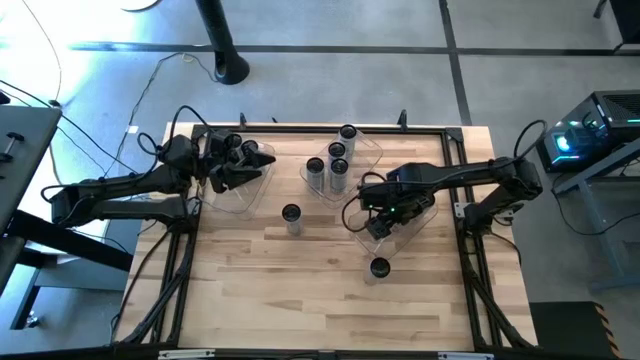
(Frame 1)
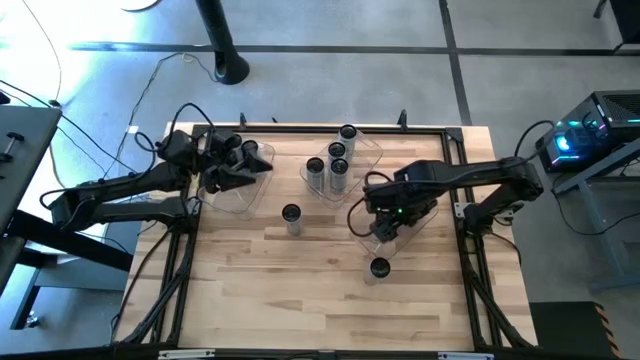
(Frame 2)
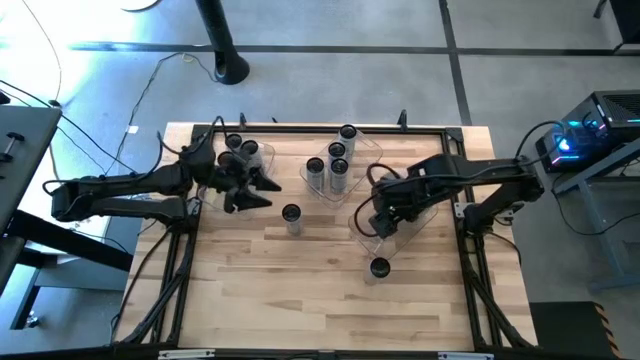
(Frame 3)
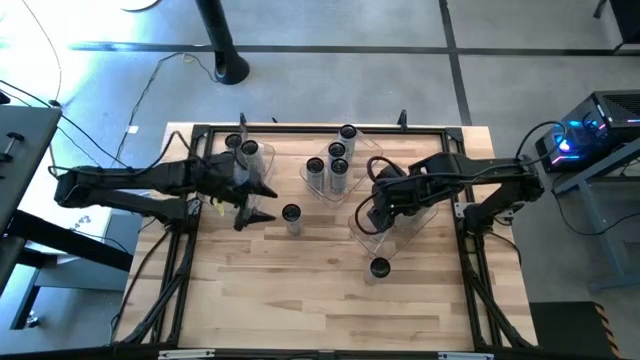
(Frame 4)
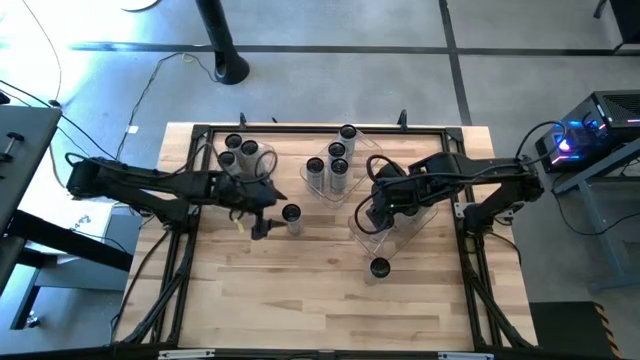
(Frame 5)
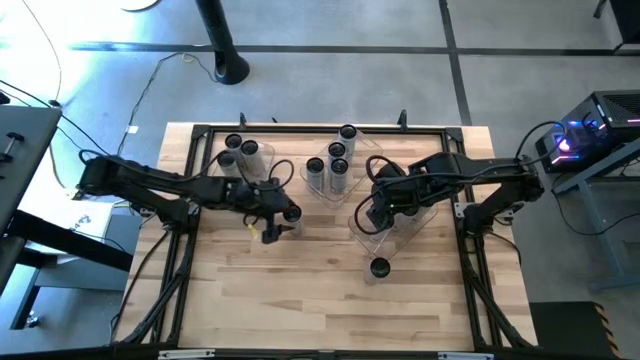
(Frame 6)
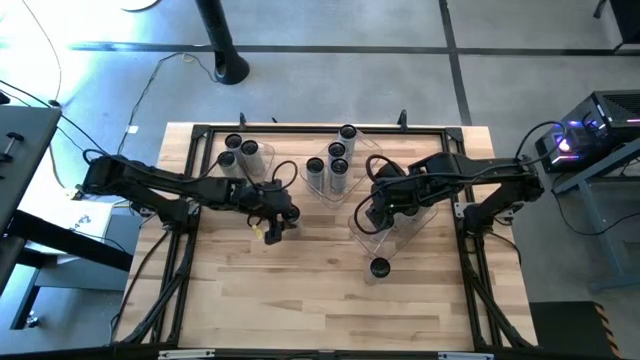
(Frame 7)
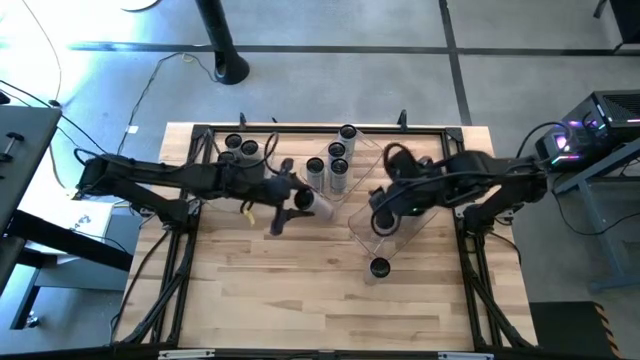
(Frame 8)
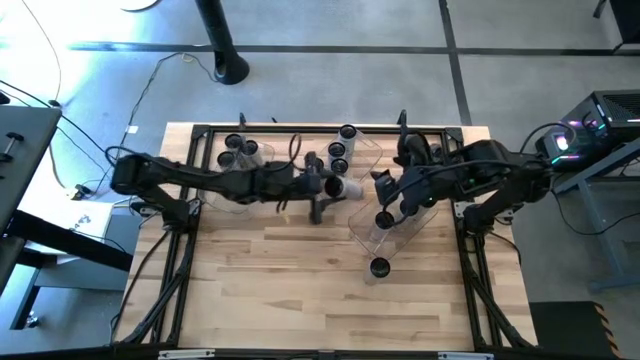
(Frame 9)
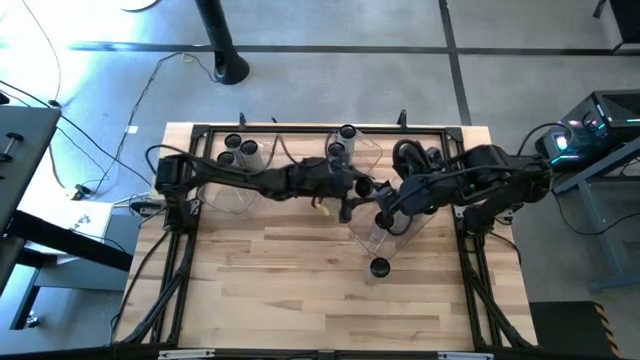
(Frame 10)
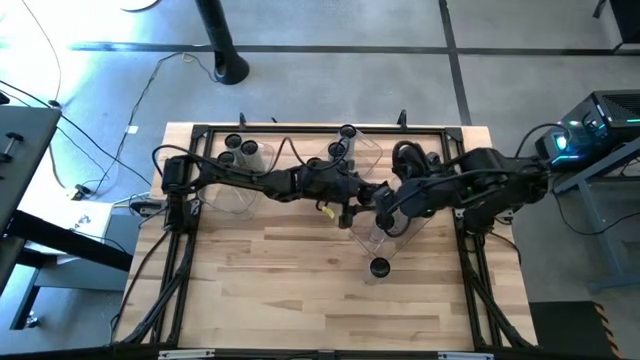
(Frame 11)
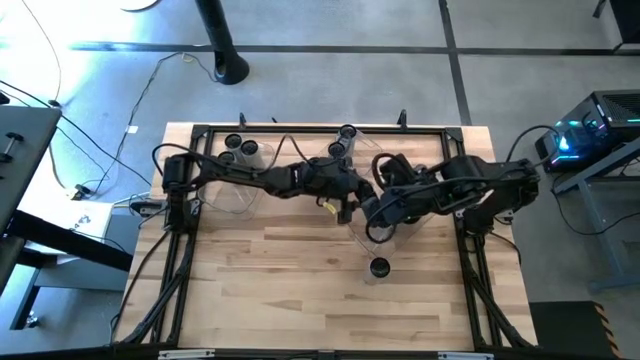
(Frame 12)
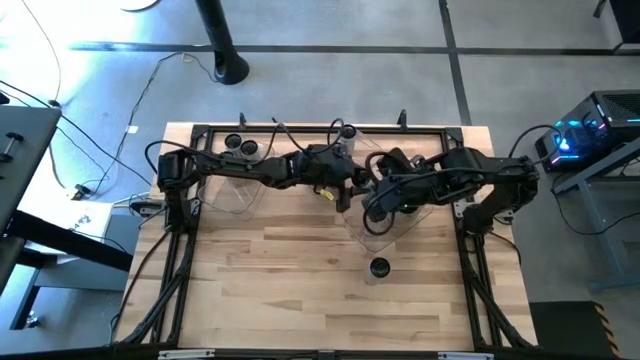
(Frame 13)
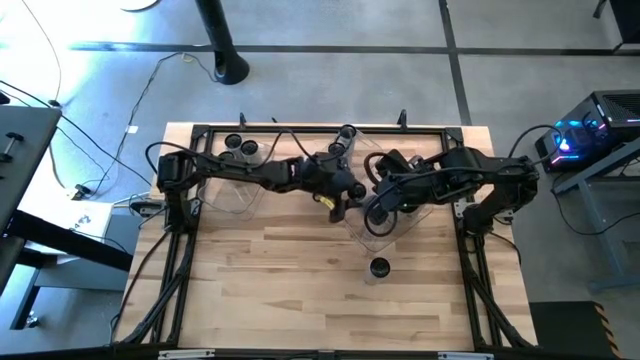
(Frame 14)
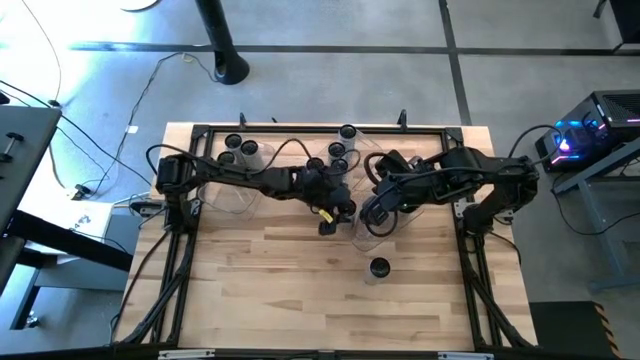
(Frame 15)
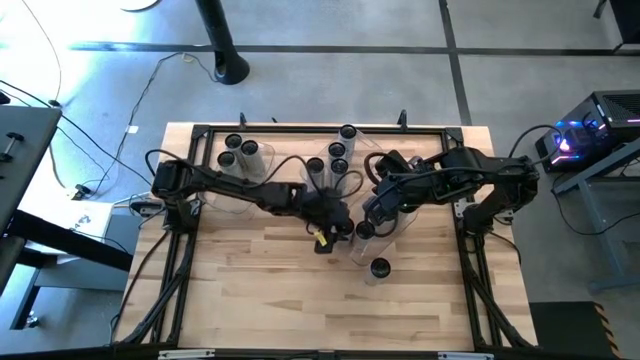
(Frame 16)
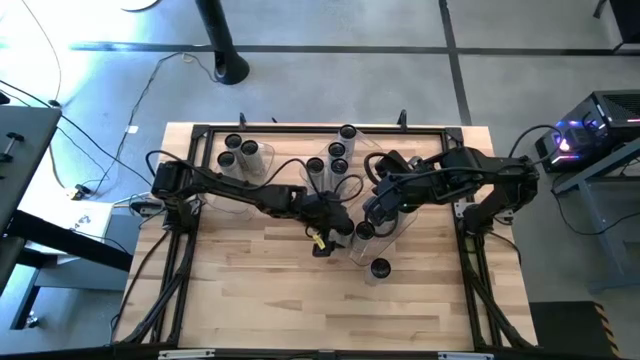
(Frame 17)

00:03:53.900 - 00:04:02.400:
Task: Sort soda cans
Put the white-pink soda can into the top right transparent bin

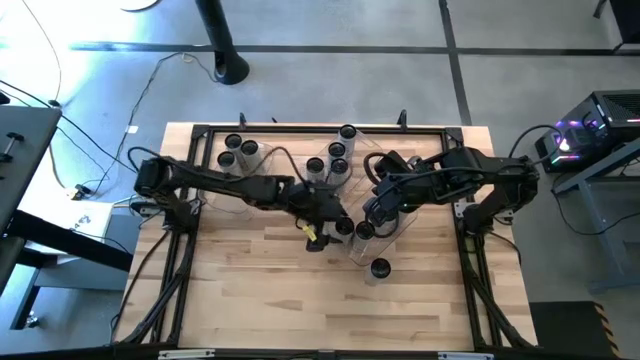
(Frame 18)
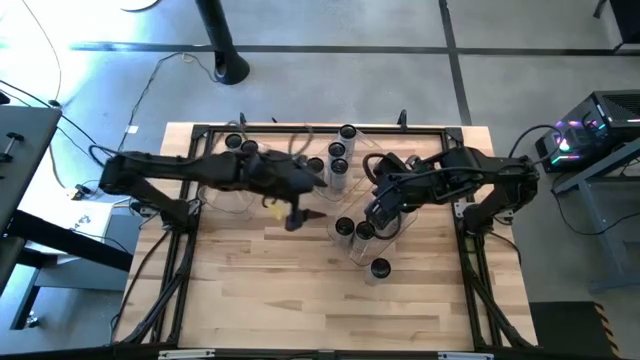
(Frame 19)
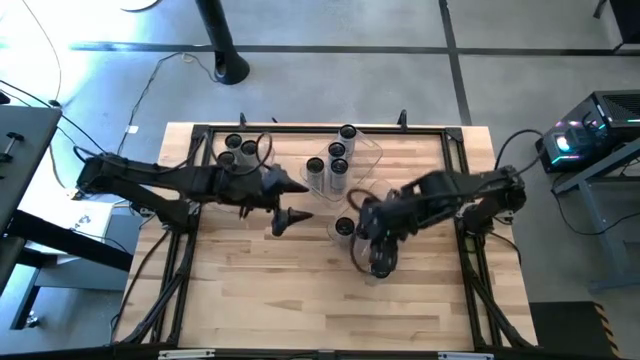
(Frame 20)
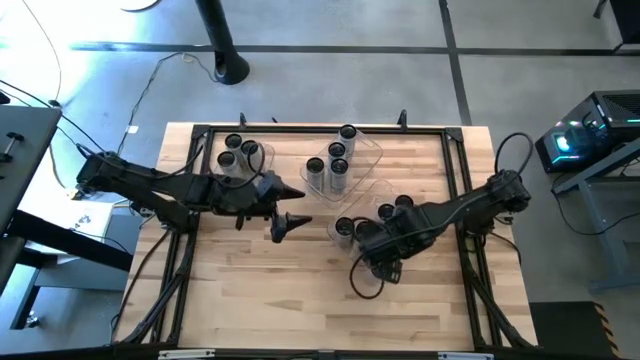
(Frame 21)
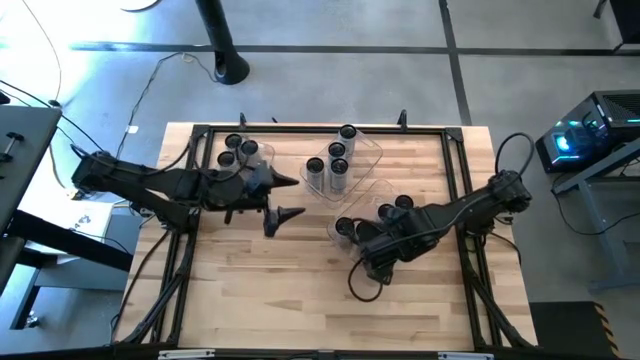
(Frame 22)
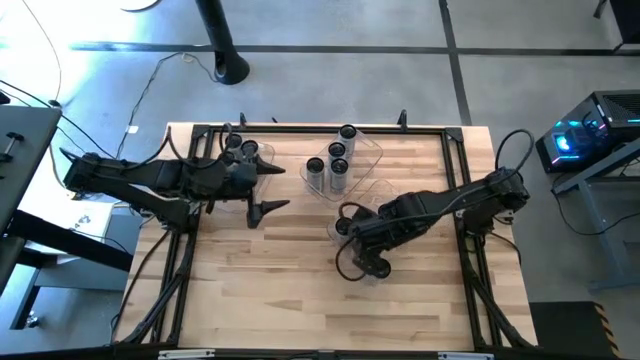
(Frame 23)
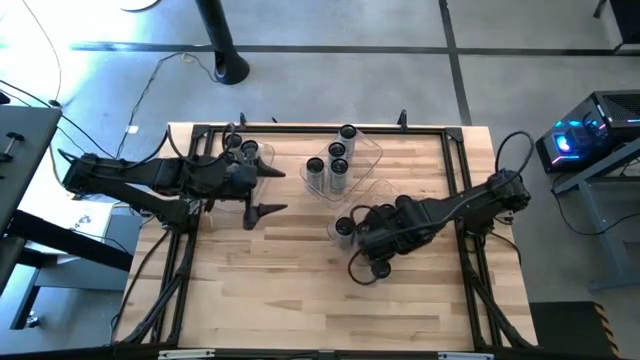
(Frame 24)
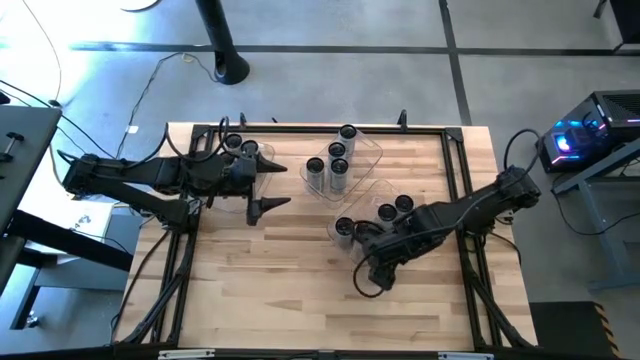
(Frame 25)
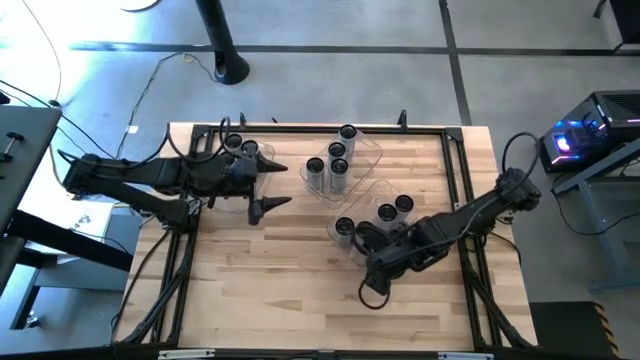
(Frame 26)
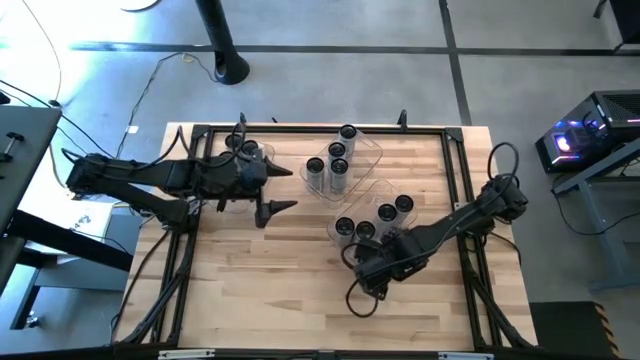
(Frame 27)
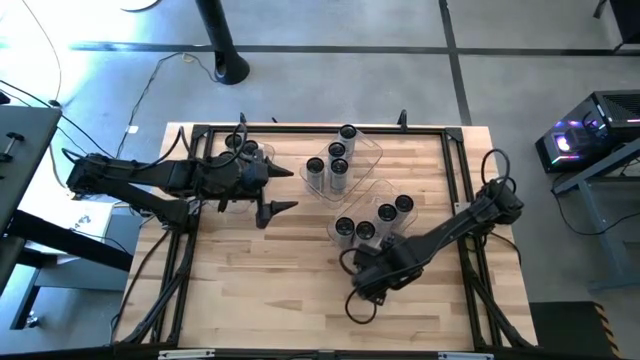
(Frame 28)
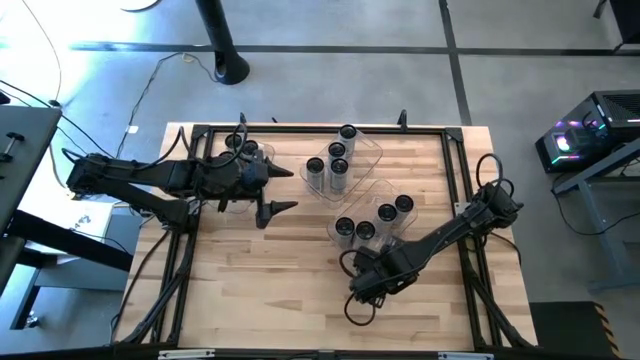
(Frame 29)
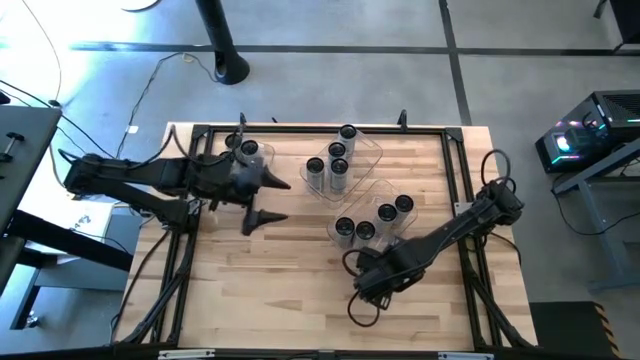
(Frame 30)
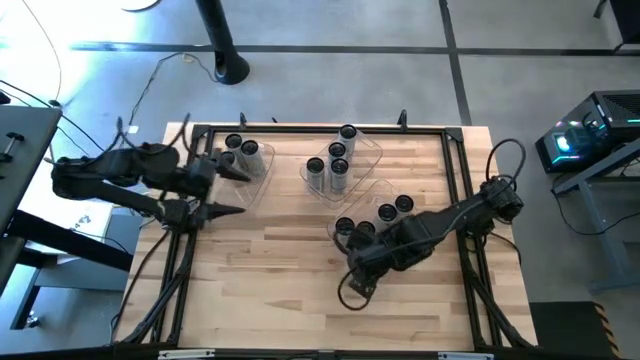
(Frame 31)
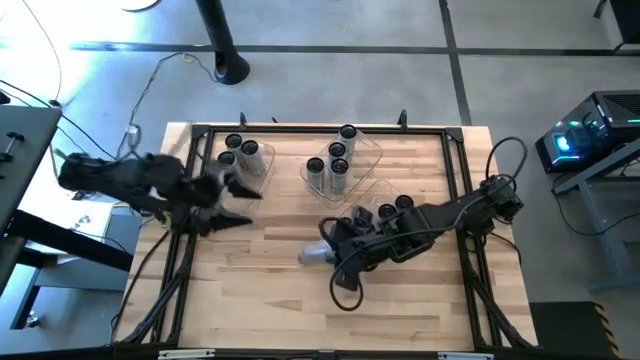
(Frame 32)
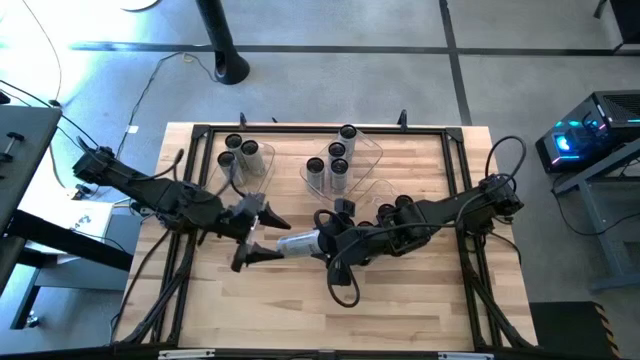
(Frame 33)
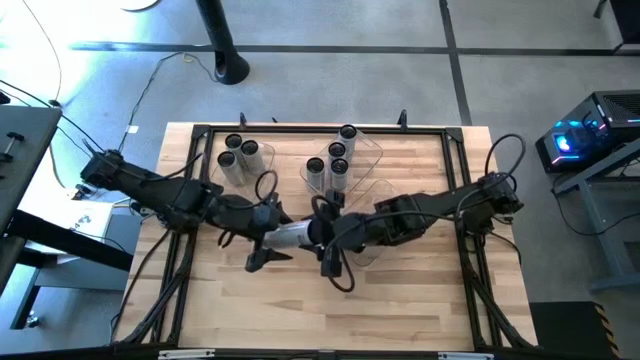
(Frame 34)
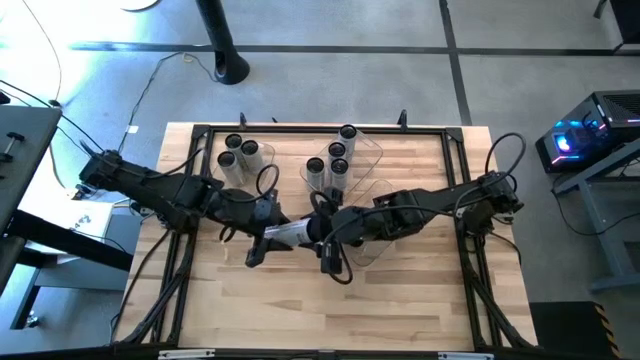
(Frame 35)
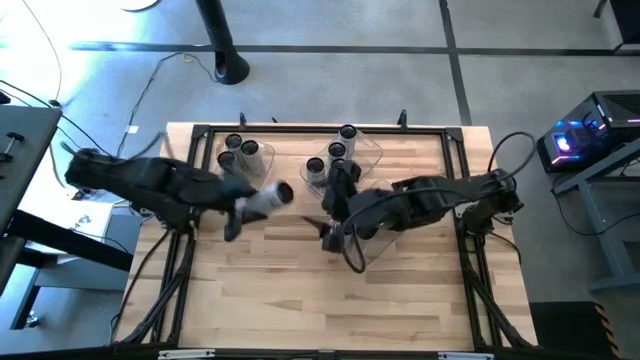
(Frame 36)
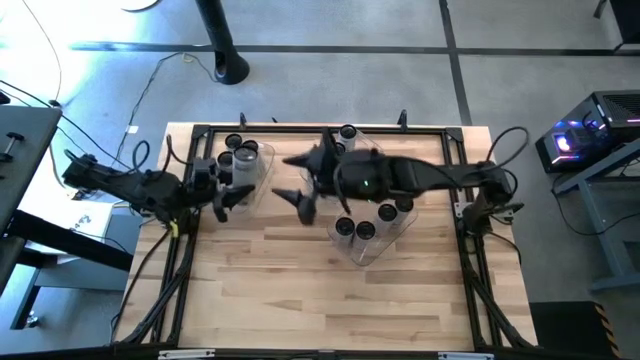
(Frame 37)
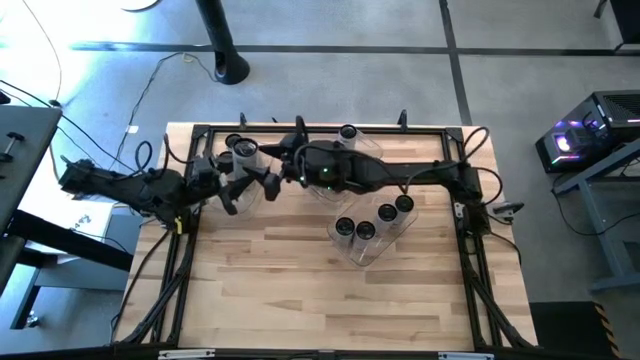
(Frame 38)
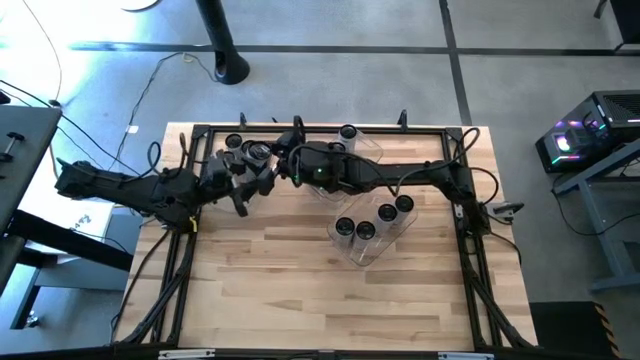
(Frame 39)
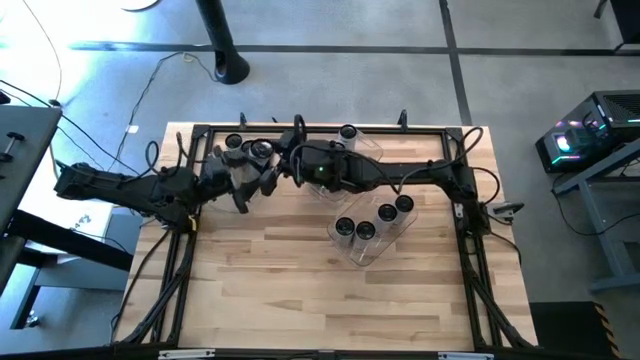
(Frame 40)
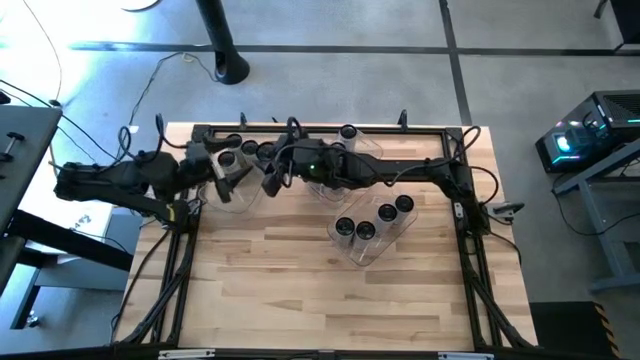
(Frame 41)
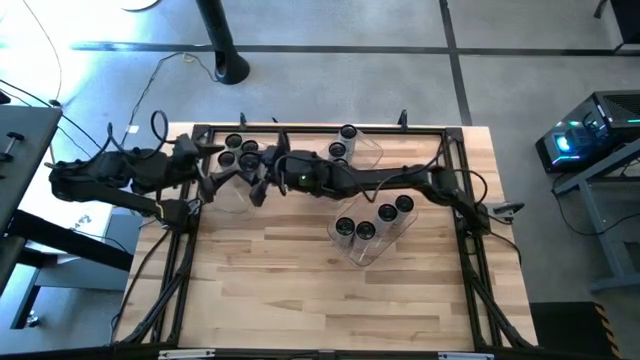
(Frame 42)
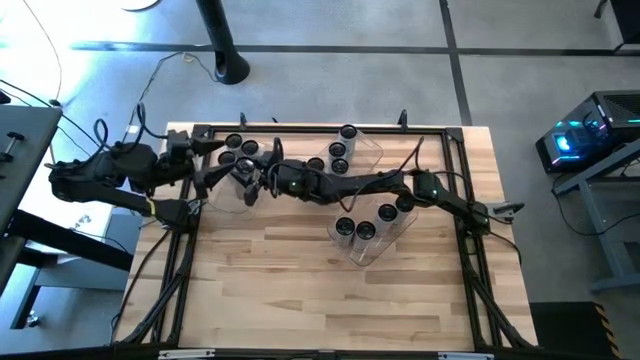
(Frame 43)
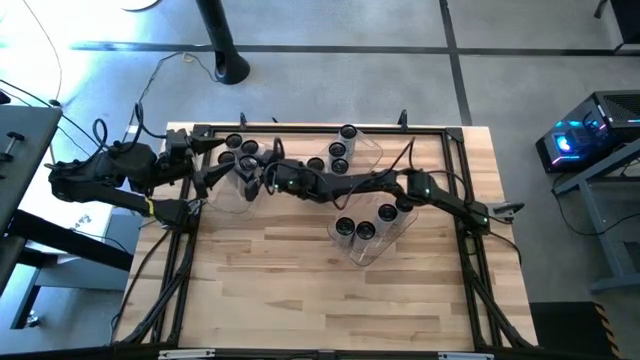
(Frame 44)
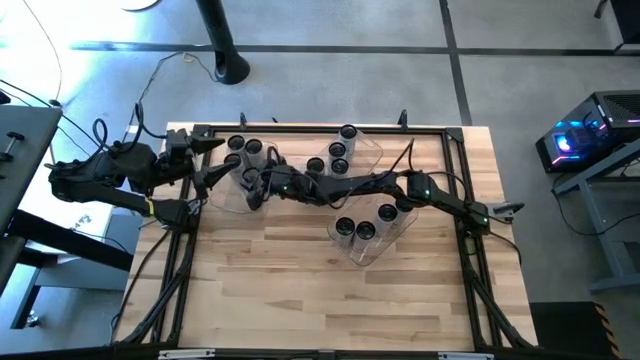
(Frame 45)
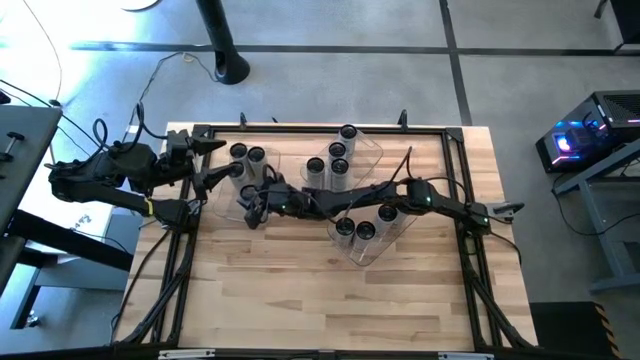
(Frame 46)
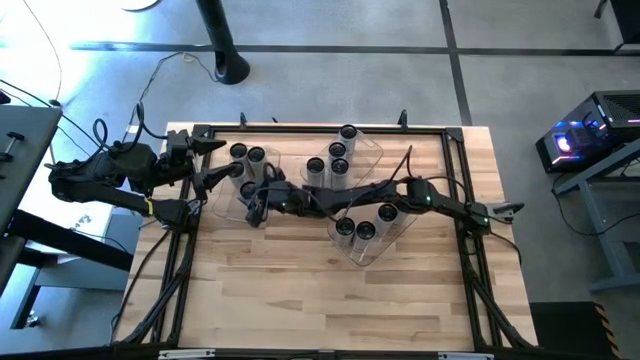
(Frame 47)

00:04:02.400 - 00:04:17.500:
Put the white-yellow soda can into the top left transparent bin
